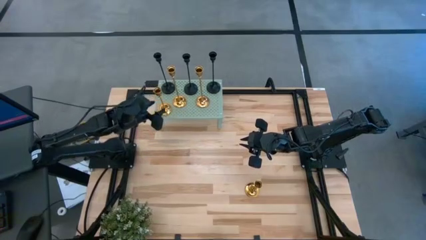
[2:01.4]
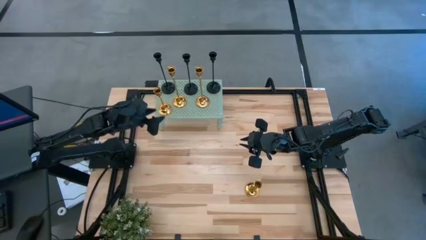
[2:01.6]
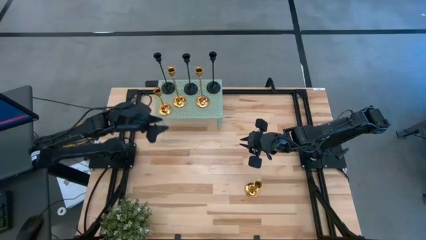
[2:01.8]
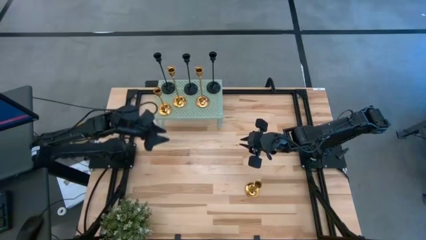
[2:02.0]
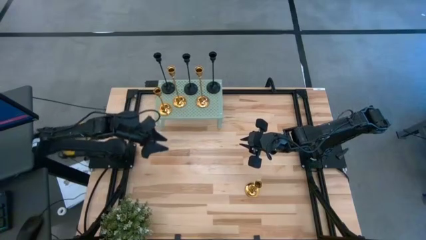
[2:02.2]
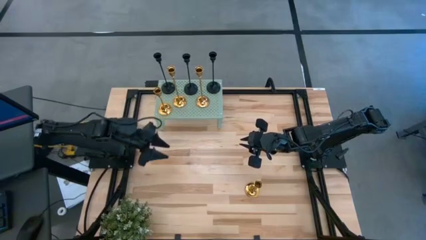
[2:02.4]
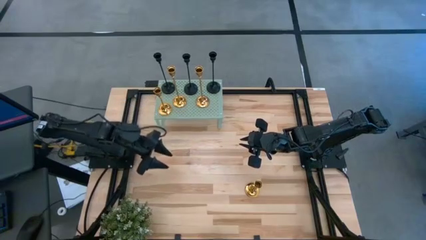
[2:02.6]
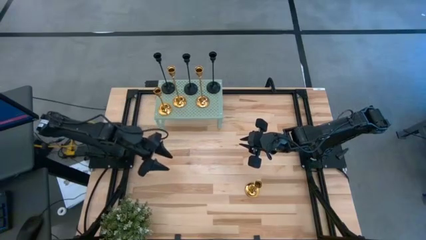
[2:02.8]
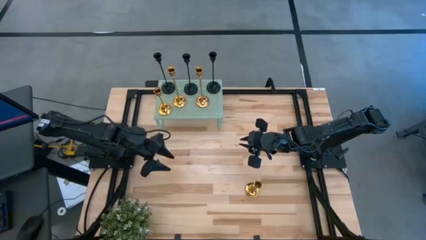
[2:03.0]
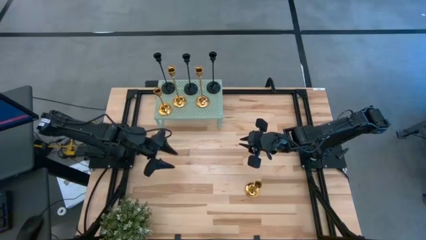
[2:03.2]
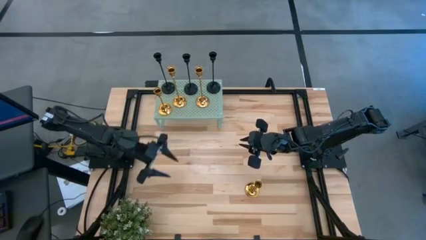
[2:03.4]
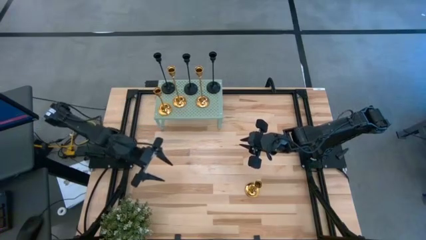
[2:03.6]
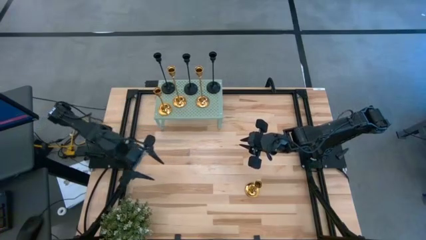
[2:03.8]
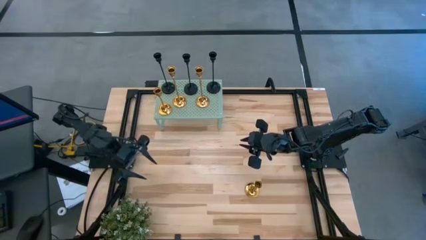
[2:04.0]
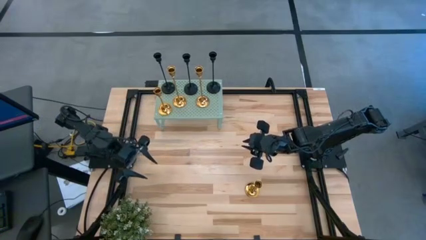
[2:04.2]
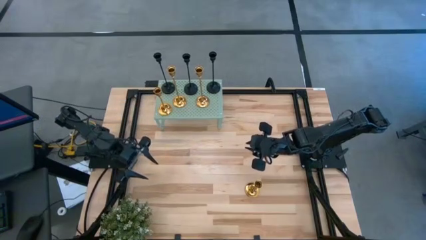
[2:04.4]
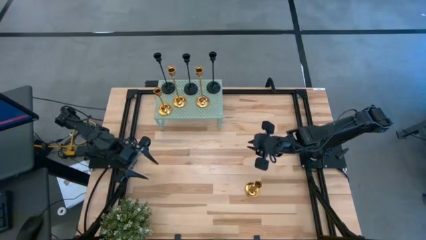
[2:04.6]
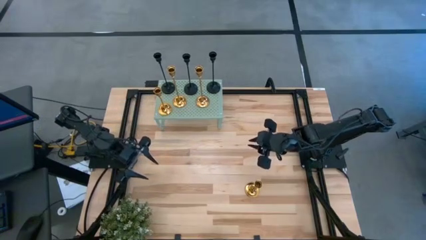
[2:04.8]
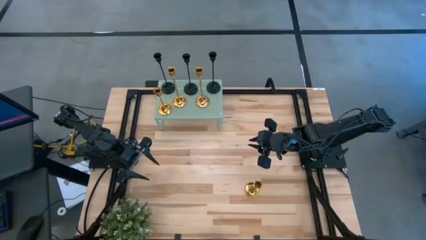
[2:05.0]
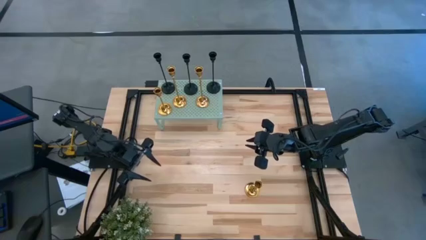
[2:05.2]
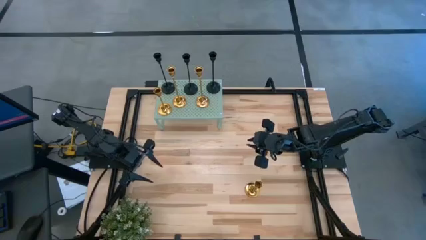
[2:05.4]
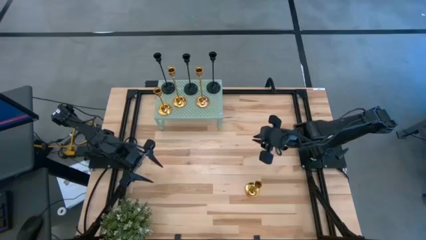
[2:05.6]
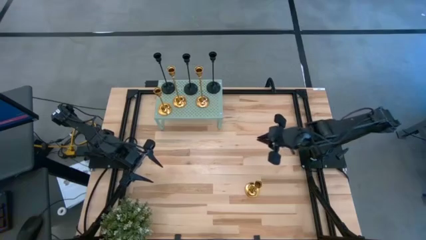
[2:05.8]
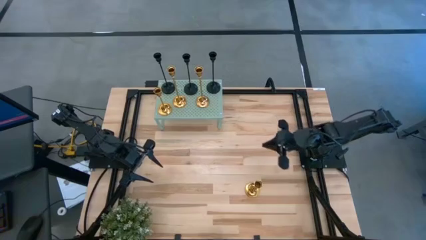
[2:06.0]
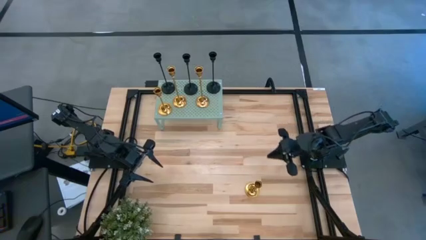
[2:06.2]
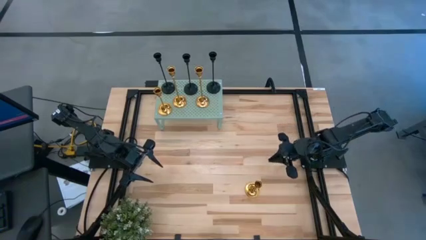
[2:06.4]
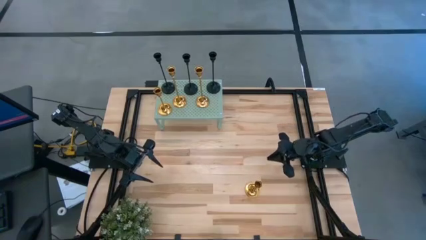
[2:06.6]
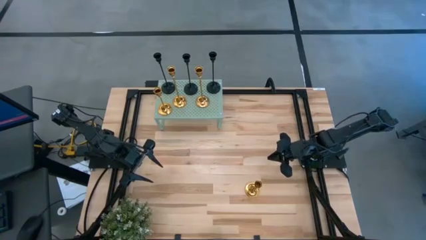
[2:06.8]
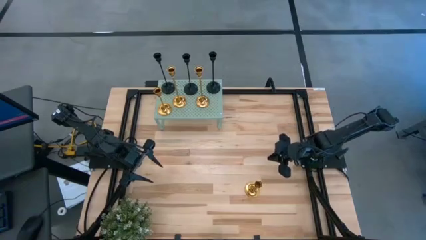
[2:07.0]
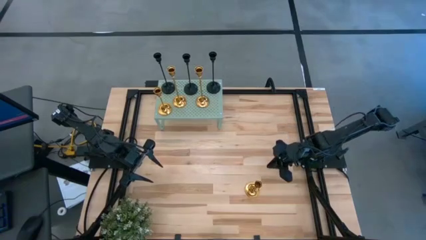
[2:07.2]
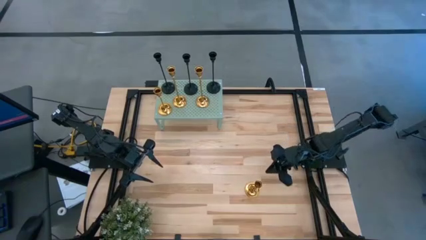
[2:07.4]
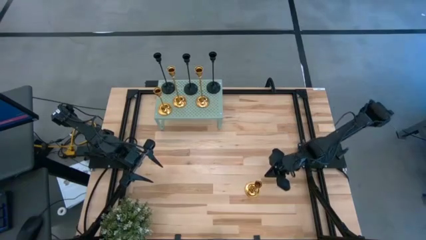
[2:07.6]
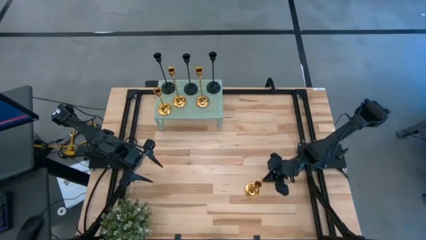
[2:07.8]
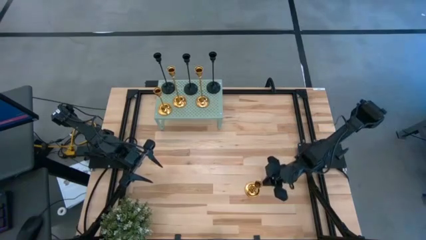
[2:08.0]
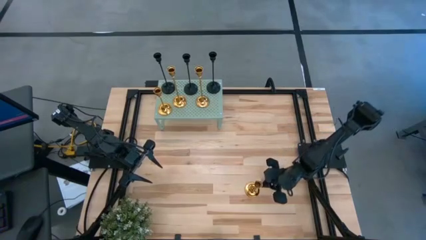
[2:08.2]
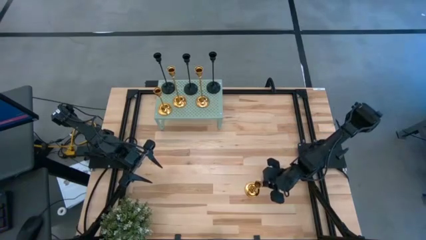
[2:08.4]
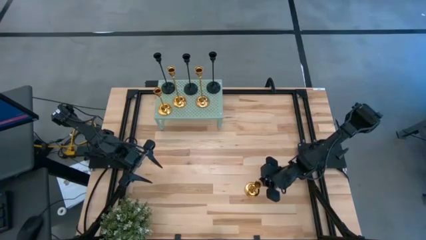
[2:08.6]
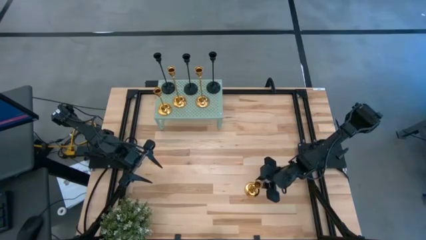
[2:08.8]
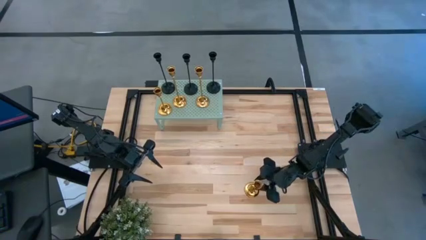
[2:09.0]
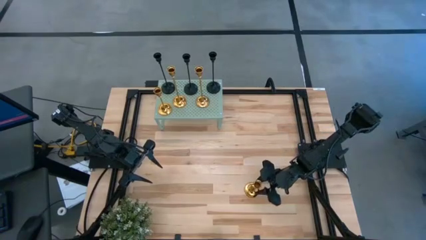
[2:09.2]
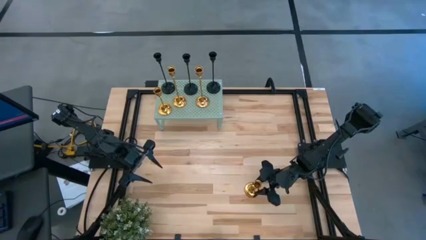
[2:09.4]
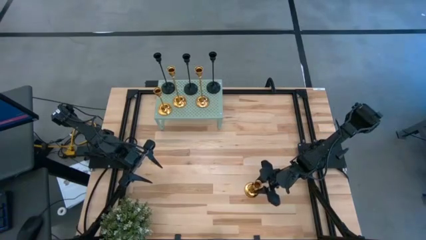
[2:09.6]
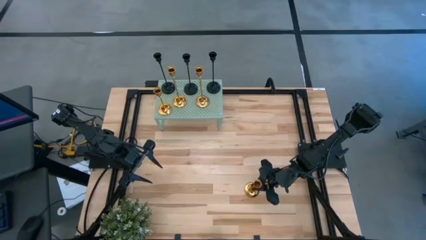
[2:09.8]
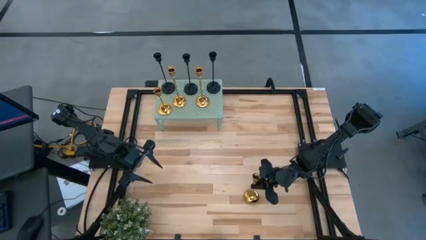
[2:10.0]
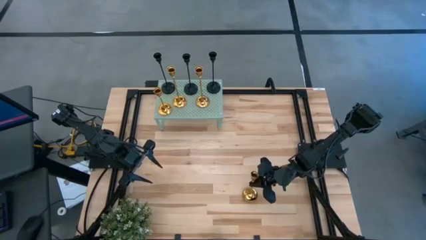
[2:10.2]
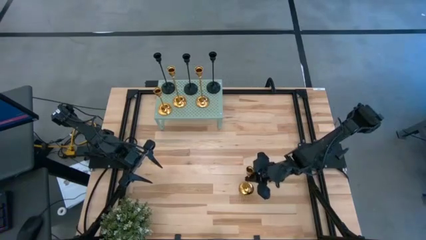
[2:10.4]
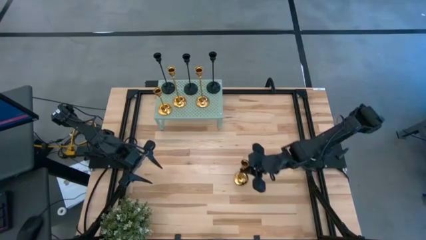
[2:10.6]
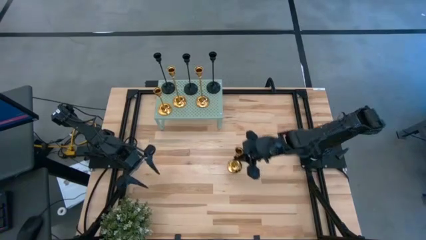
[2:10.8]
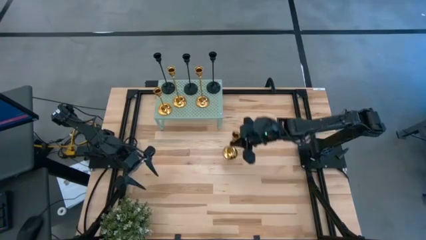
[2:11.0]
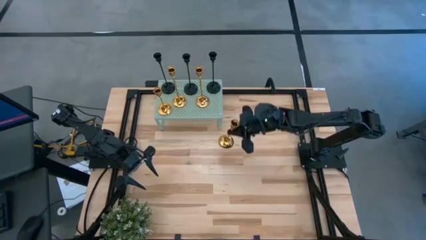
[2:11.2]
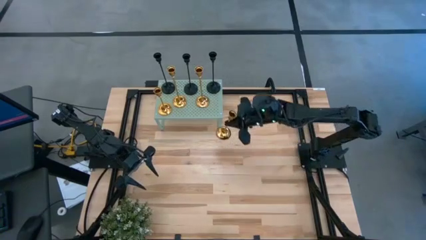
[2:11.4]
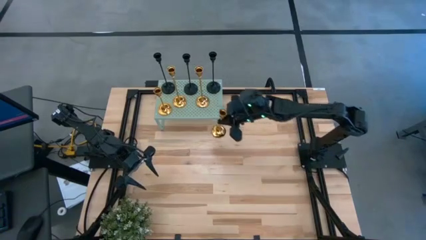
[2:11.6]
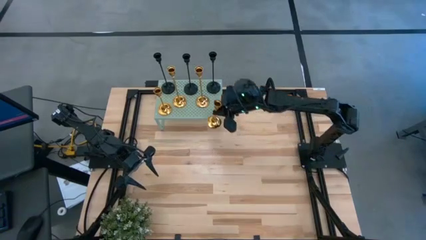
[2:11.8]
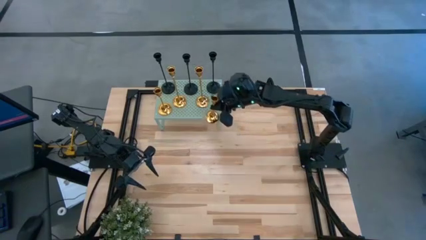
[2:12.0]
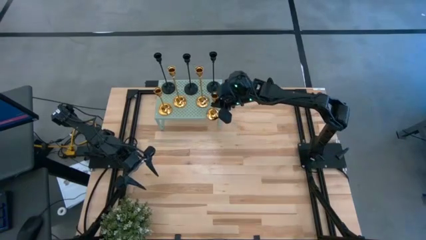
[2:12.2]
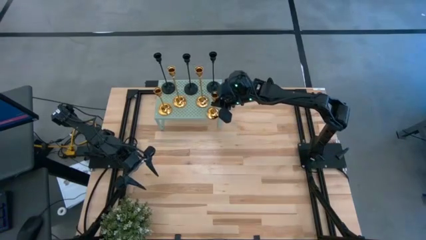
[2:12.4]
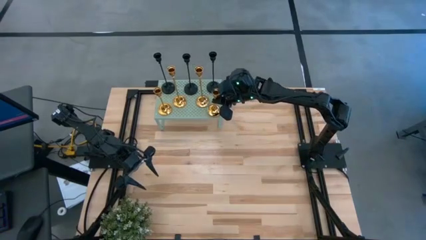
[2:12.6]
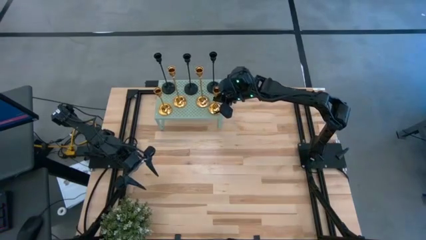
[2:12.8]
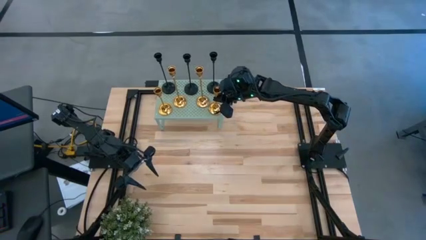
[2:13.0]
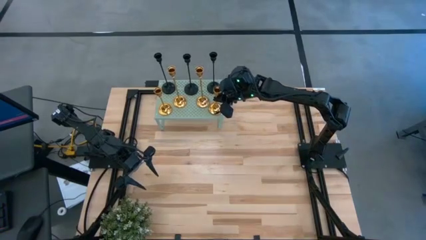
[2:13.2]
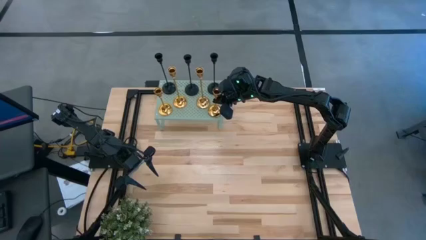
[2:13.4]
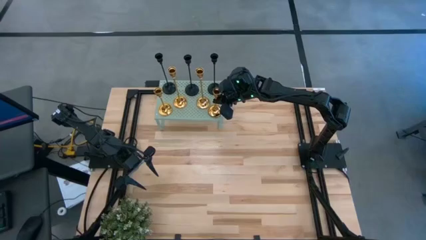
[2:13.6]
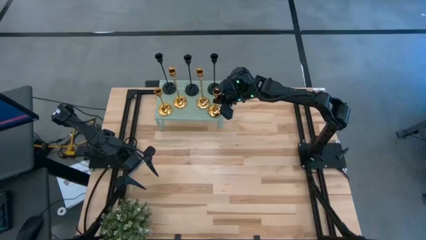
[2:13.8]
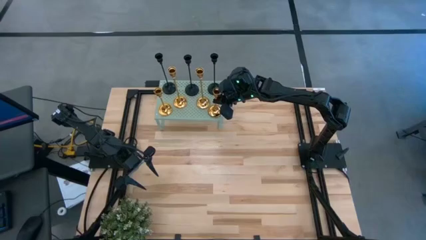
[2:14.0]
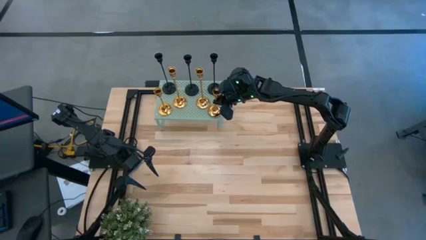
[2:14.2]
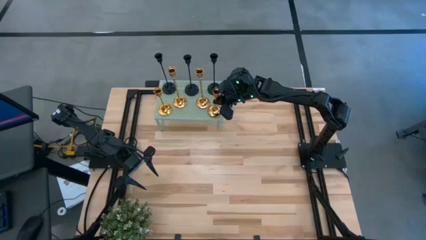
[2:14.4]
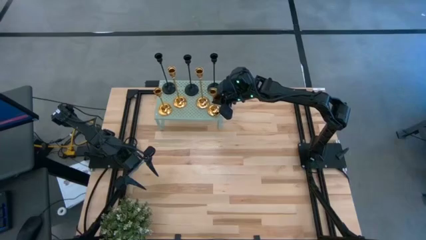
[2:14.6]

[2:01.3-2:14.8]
Task: Pick & Place candle stick holders
Put the gold candle holder on the shelf

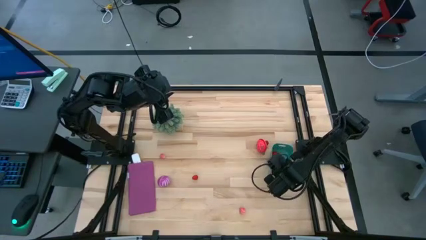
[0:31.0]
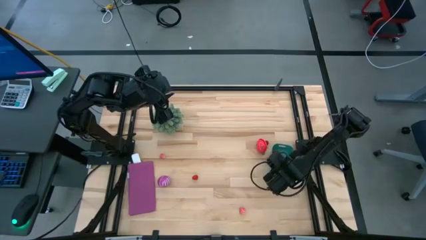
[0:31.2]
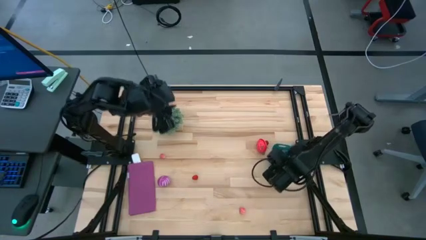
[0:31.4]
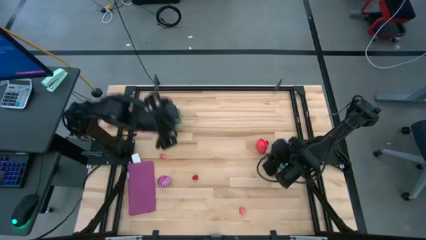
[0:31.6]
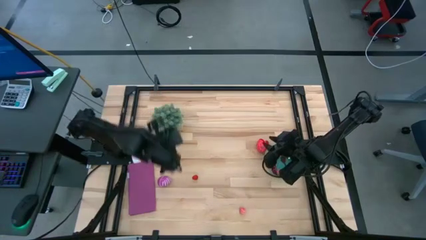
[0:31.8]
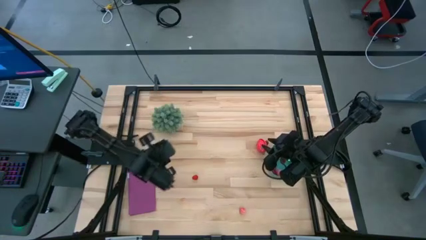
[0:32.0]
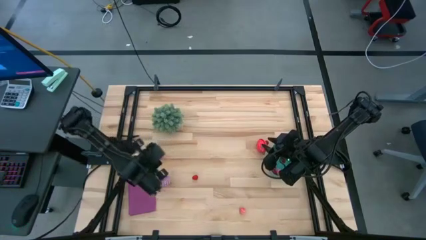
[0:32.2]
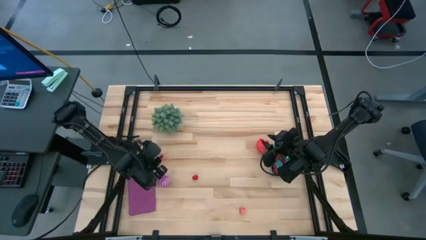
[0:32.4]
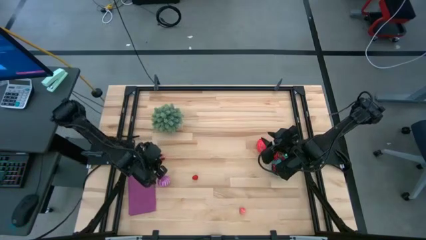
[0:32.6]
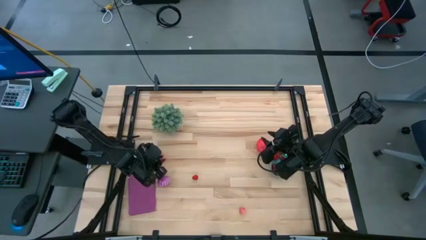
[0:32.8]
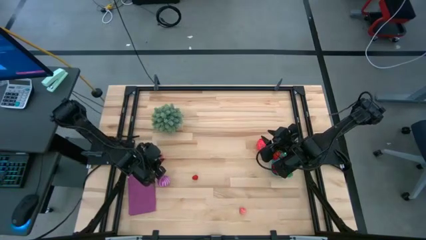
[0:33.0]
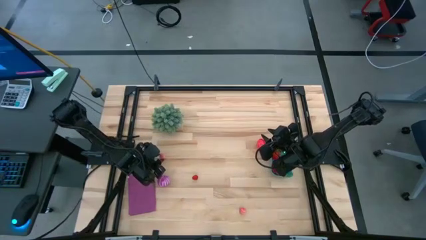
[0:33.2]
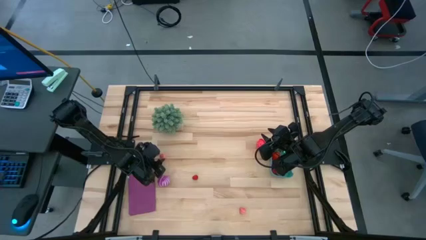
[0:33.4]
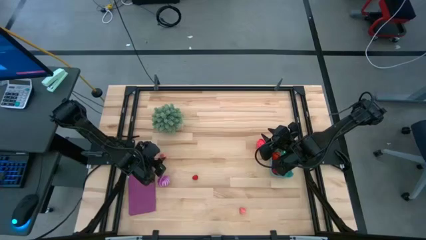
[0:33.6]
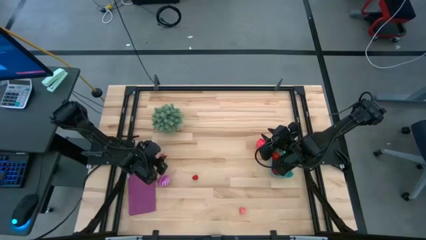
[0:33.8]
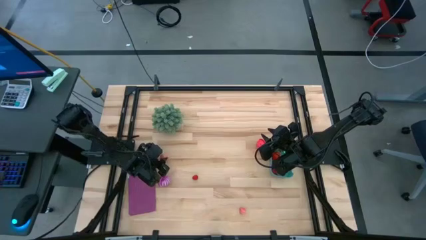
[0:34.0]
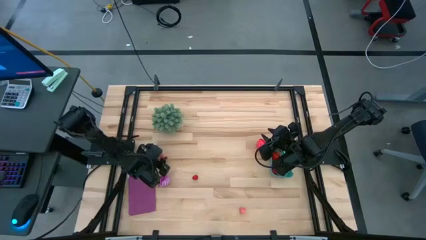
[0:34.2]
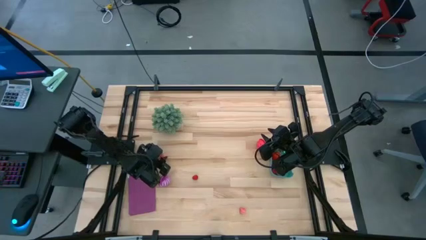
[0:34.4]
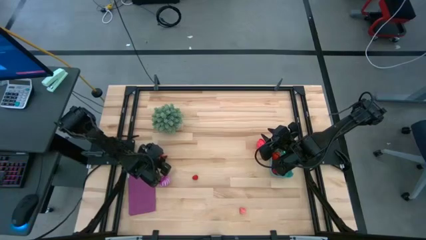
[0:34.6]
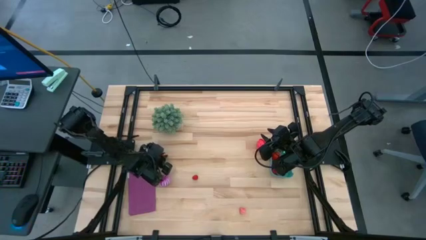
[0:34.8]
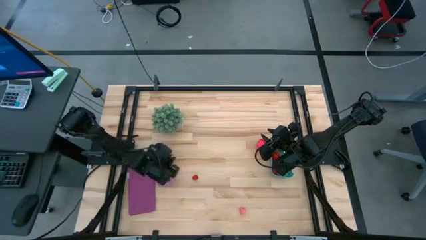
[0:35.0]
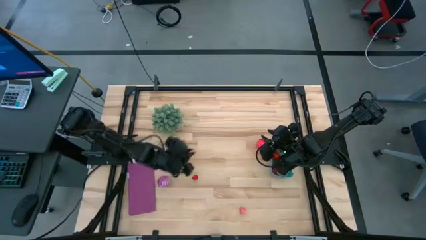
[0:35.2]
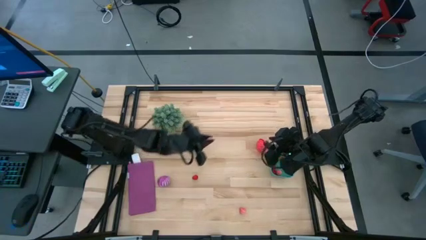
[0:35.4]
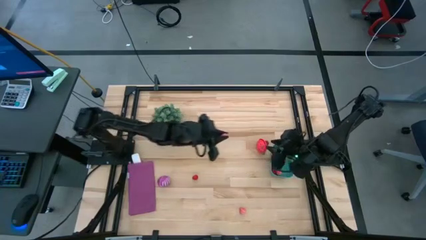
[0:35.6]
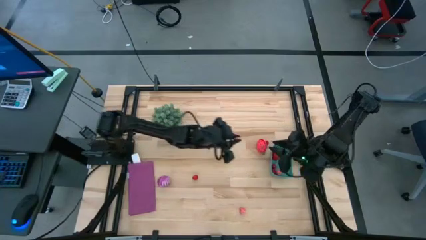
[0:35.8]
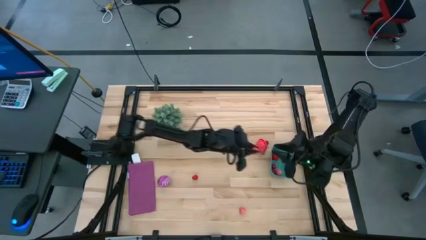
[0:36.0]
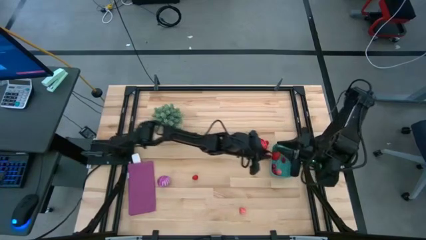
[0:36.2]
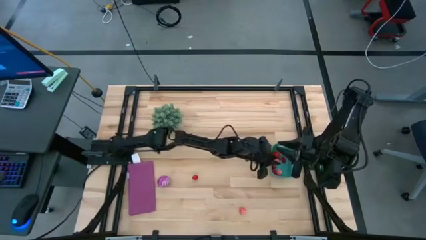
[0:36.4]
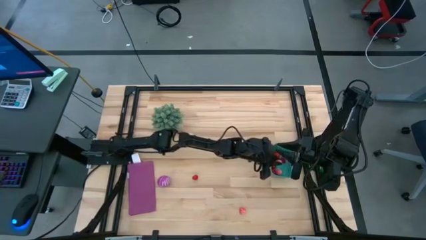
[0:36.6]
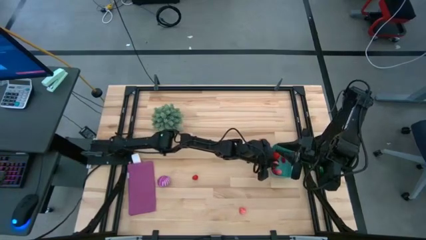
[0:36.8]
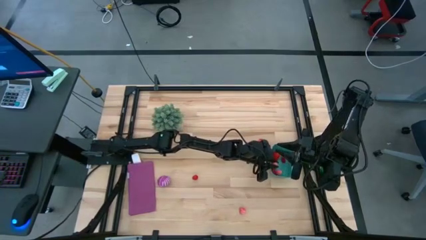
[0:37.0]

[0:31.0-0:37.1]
Task: Pick and placing Produce into tupperware
Put the pink peach into the green bin
